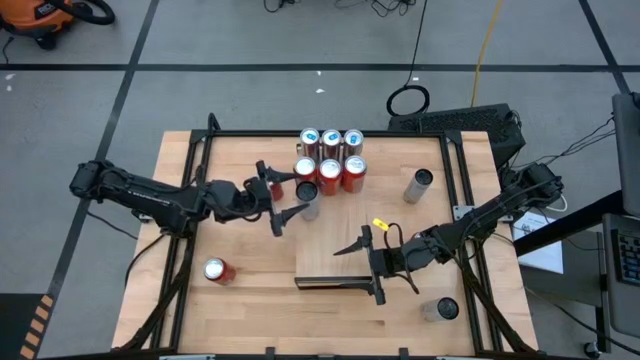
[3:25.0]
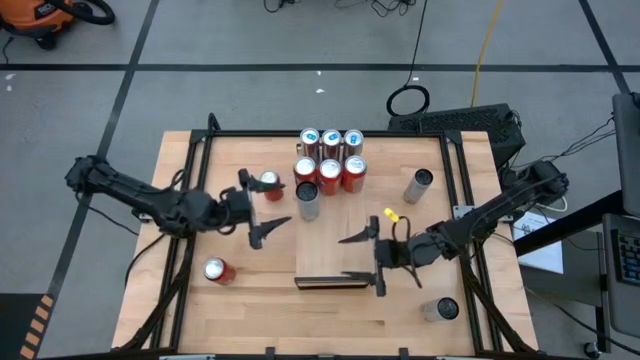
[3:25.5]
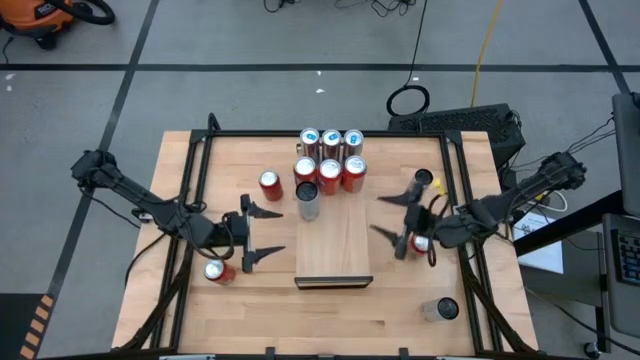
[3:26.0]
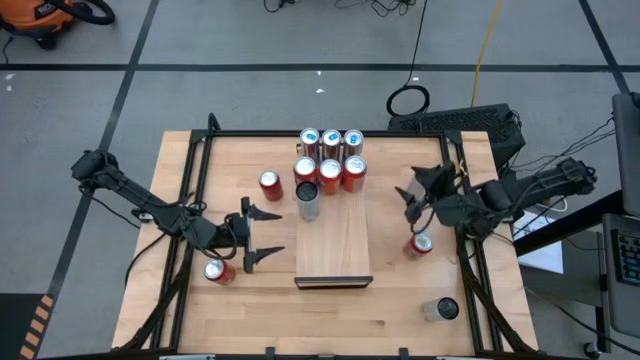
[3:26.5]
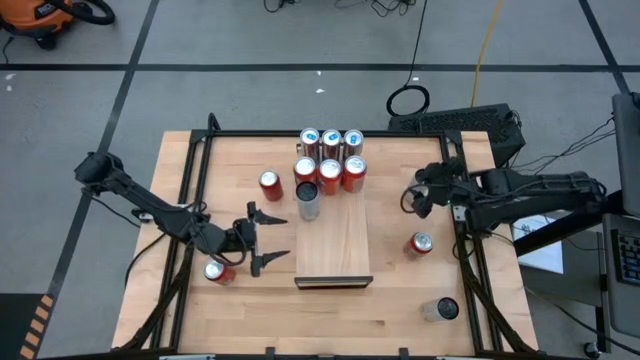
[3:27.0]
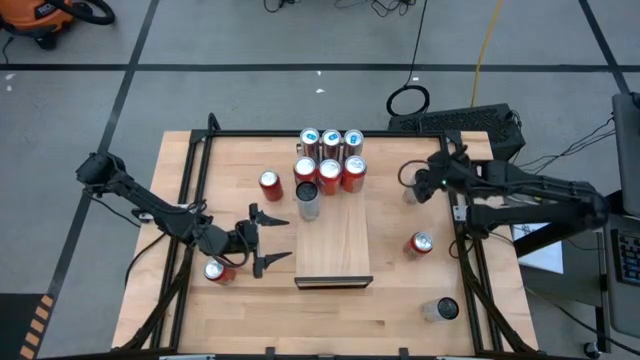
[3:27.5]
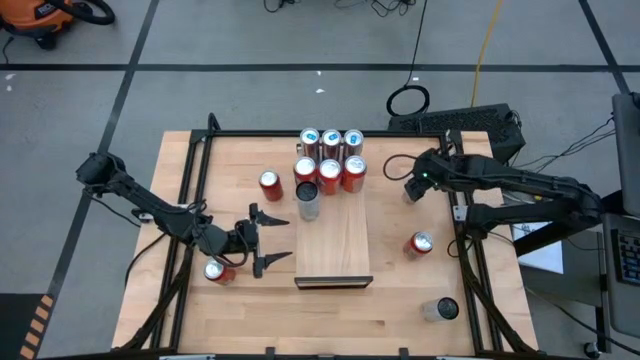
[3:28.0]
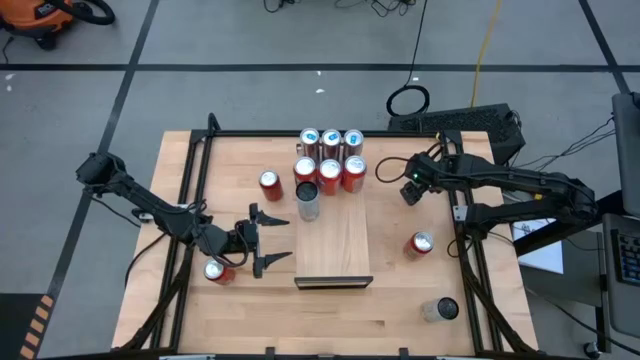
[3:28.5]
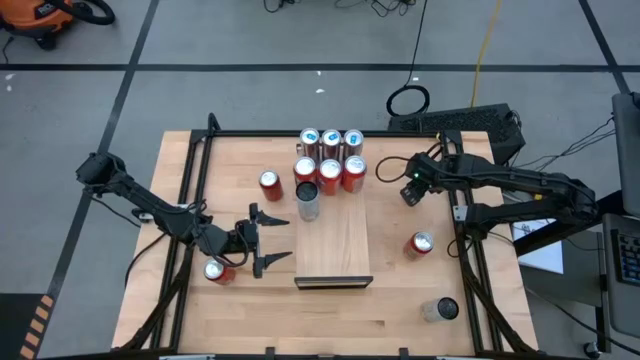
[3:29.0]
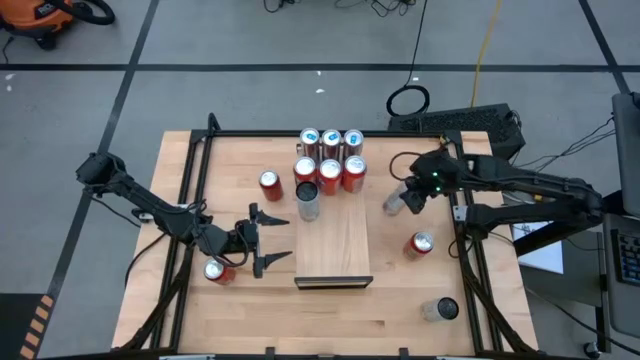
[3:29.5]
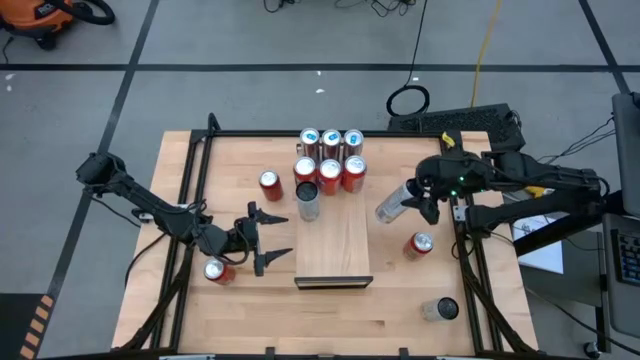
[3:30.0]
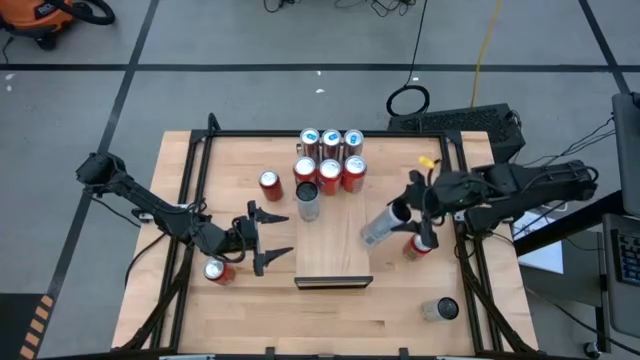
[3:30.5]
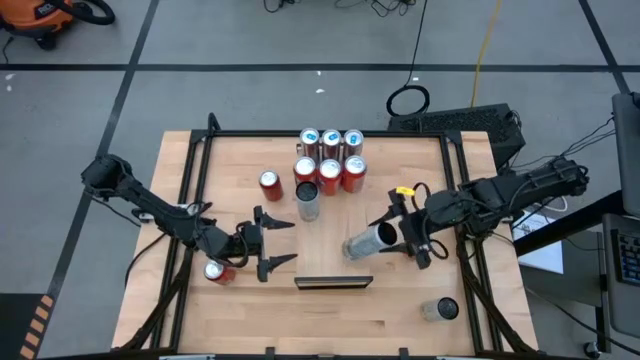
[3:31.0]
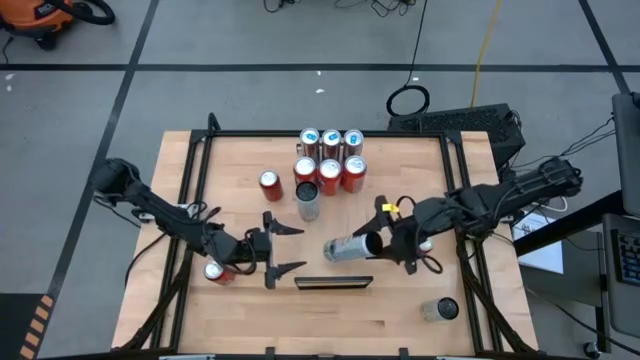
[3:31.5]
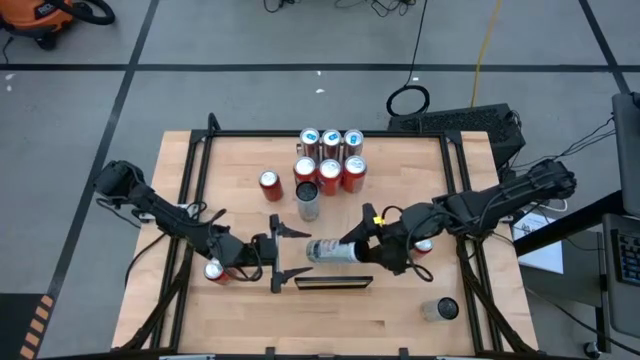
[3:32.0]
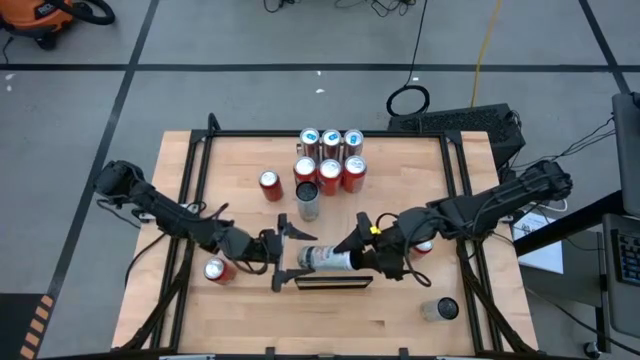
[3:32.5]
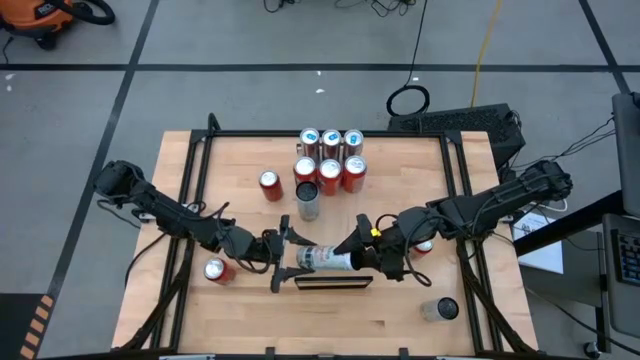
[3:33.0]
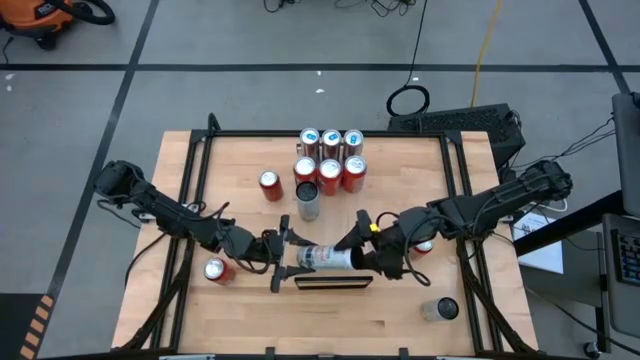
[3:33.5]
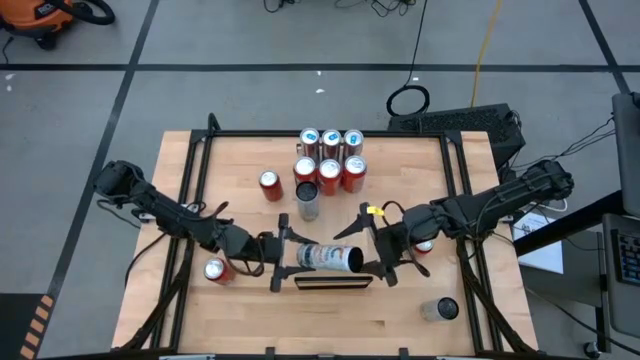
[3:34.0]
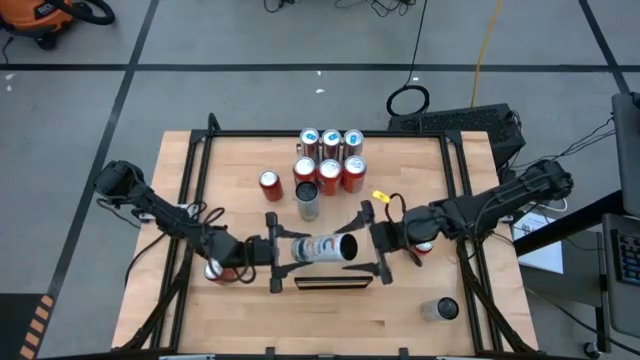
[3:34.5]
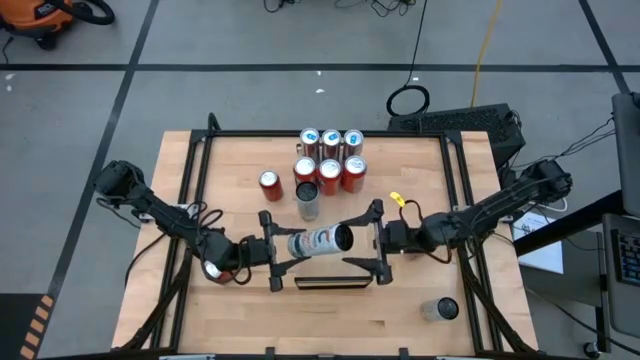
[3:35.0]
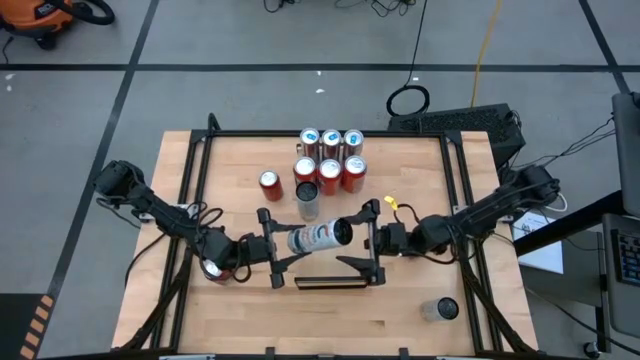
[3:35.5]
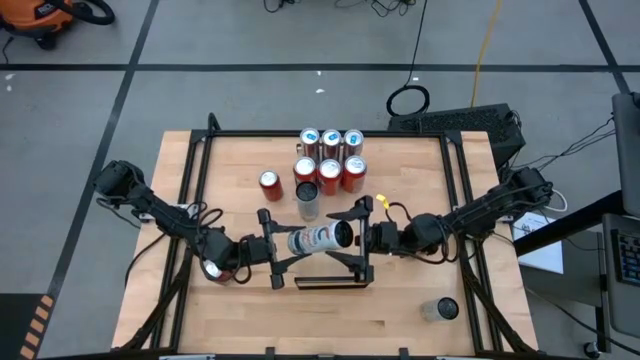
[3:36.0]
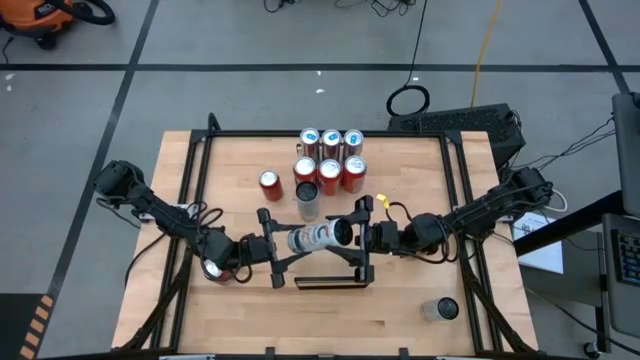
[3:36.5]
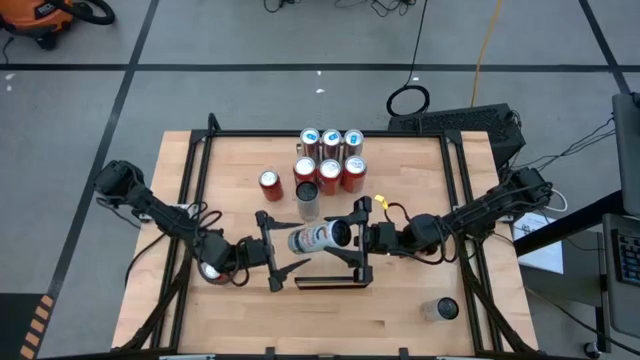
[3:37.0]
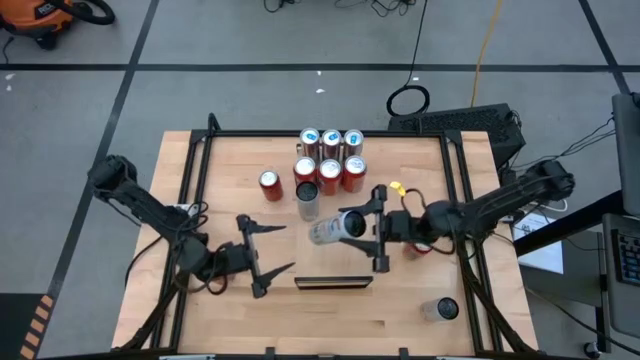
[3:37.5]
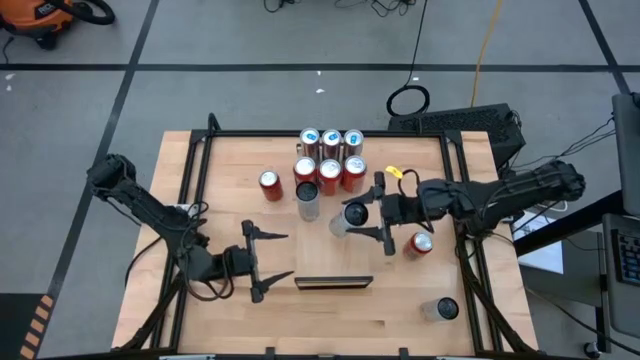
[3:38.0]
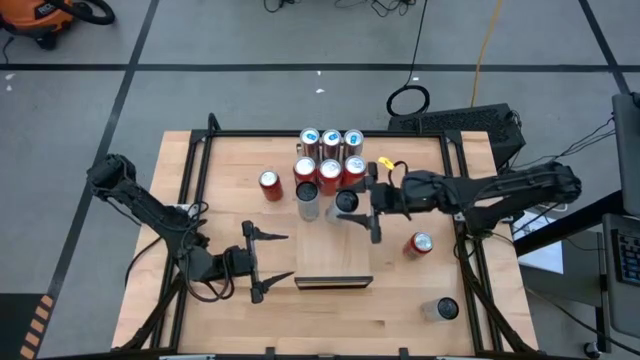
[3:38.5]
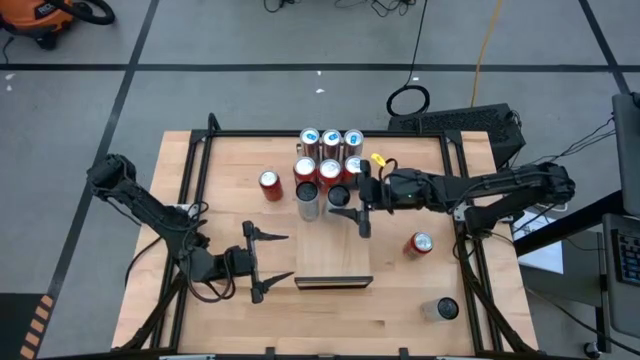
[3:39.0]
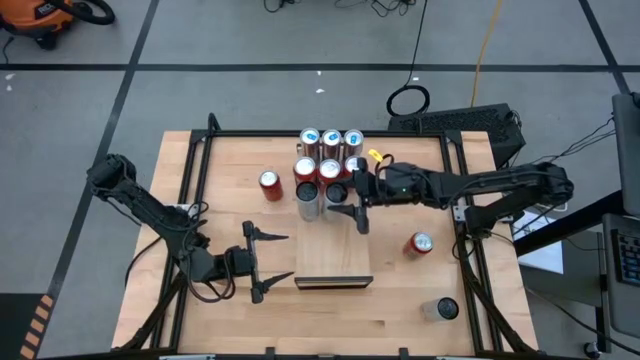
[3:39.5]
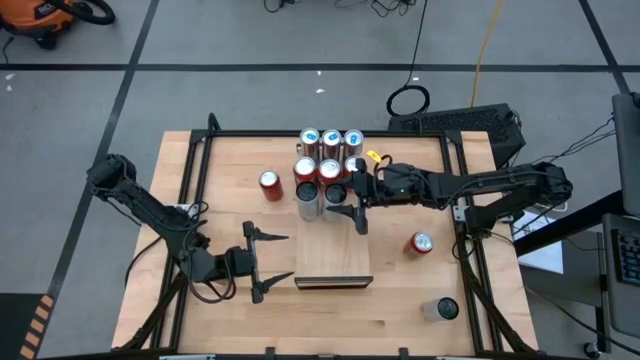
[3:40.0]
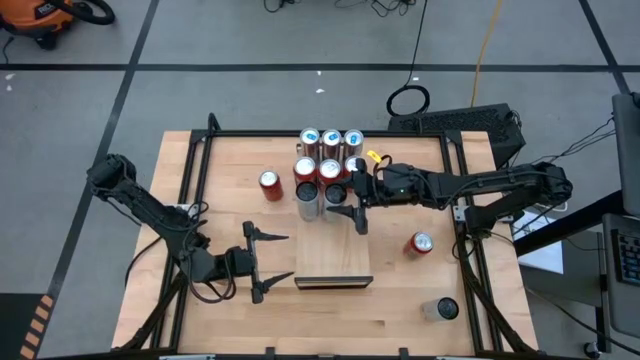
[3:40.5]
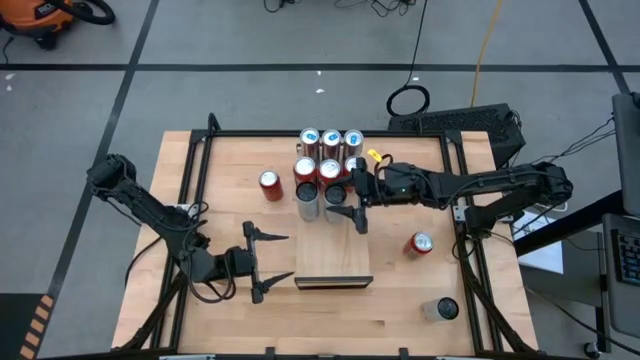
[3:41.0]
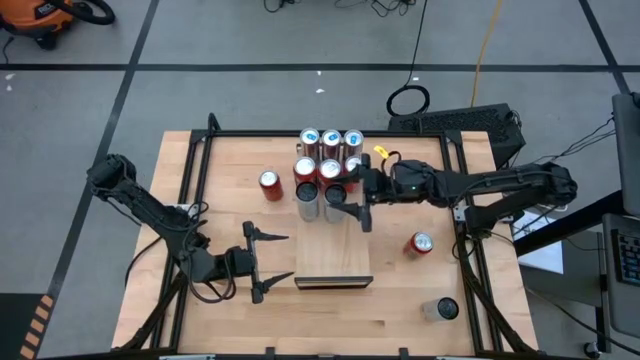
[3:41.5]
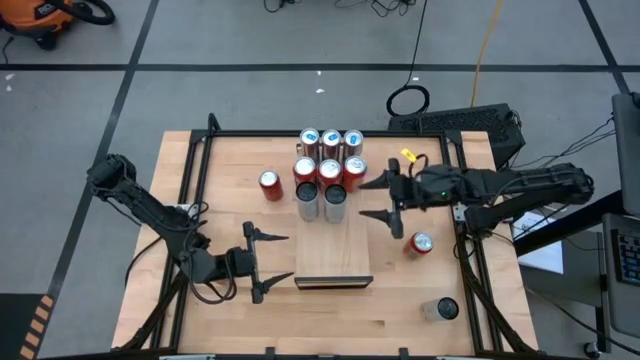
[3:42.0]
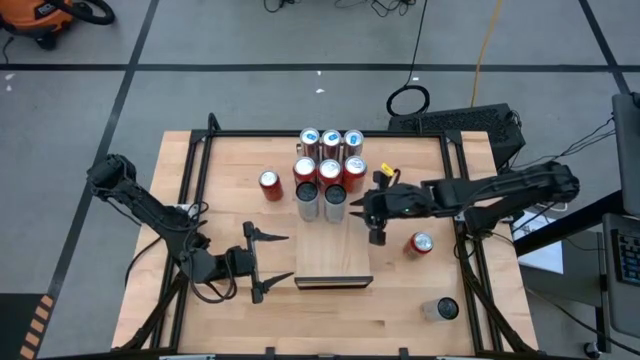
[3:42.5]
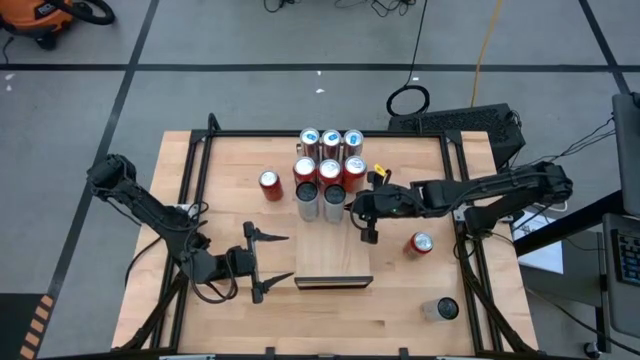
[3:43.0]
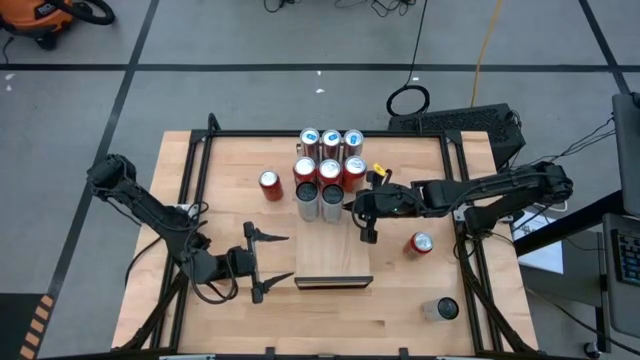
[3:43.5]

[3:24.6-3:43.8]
Task: Place canned beverage on shelf
Put the top white yellow soda can on the shelf aligned with the other white yellow soda can

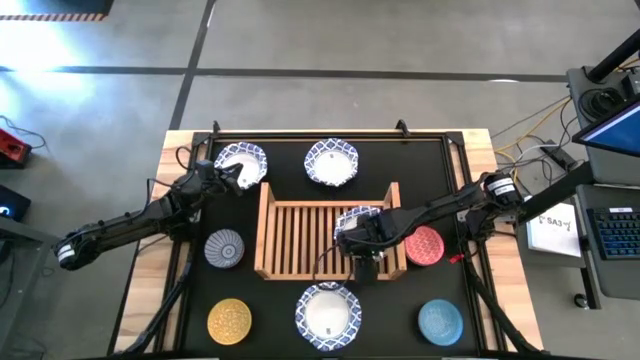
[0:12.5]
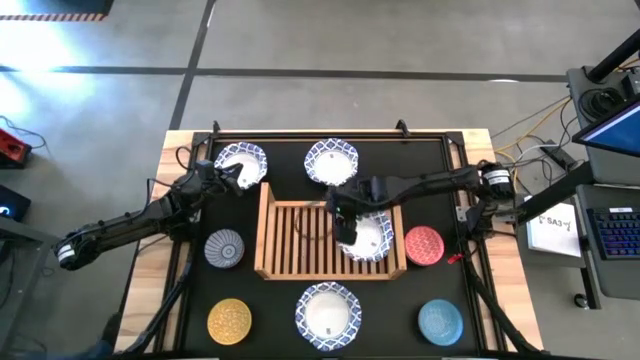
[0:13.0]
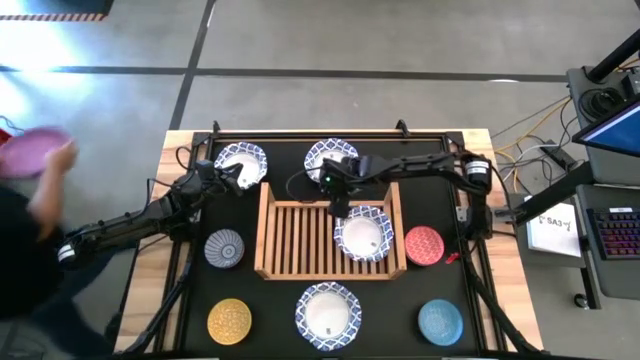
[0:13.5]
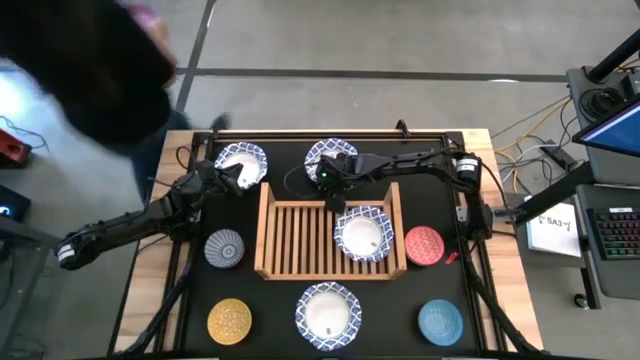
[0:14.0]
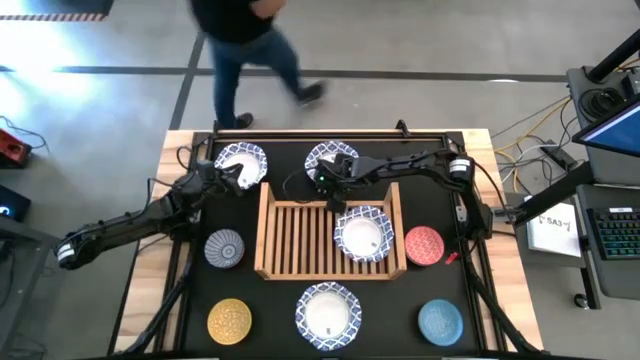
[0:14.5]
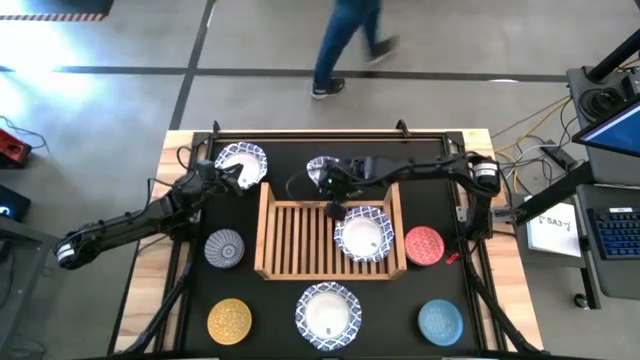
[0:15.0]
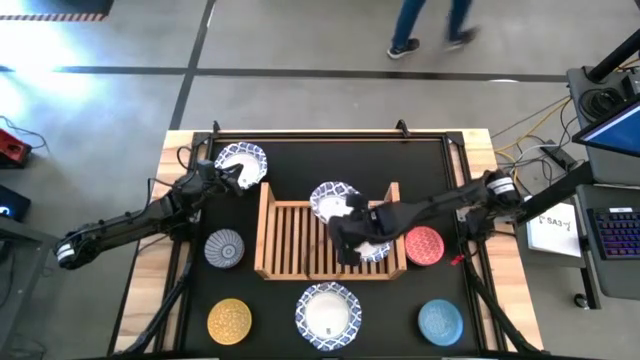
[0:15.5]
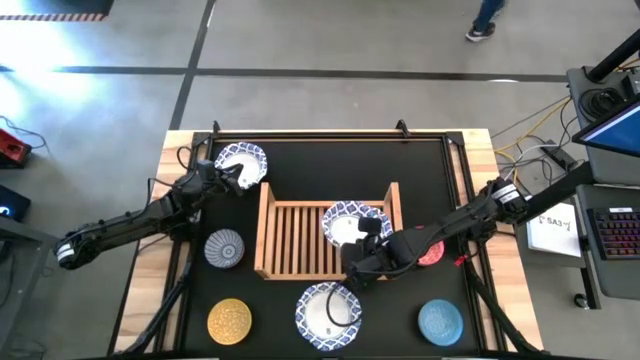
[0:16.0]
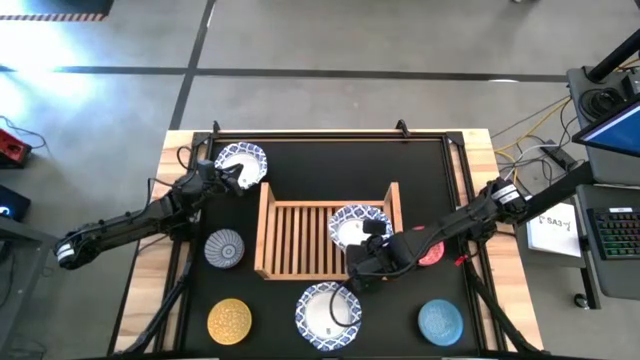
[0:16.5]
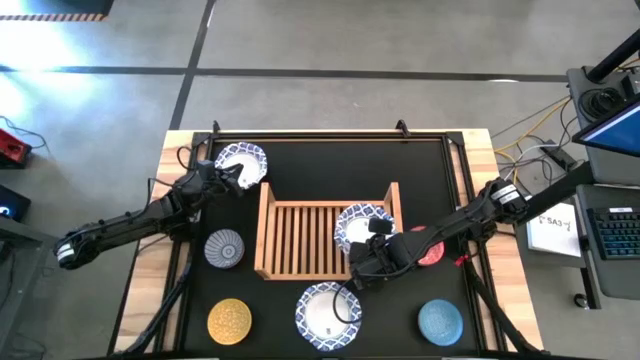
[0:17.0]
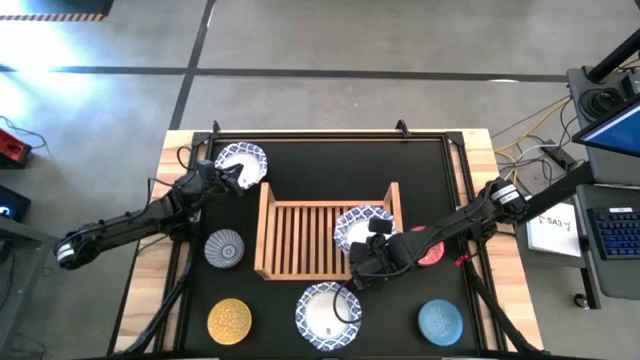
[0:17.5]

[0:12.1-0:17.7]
Task: Place and stack bowls onto a shelf
Stack the top right white bowl on top of the other white bowl on the shelf
